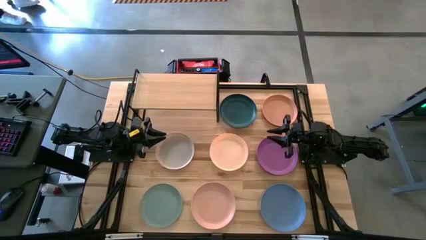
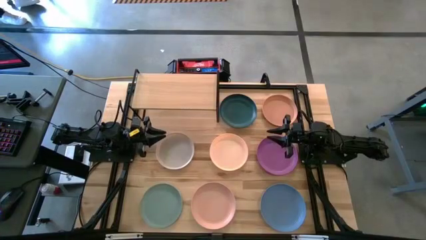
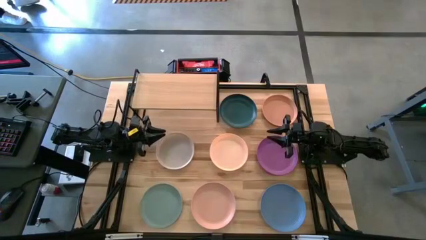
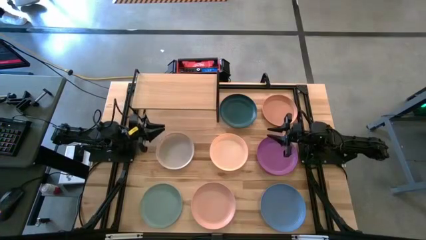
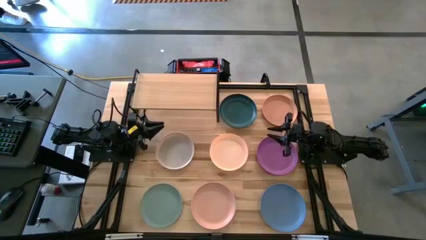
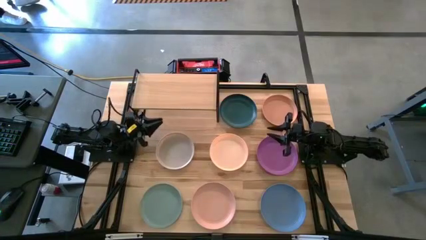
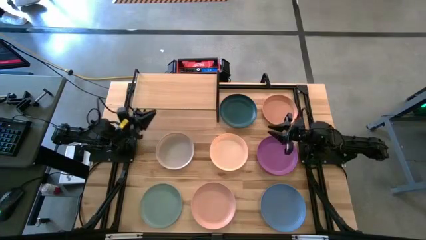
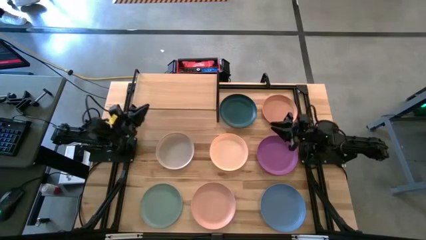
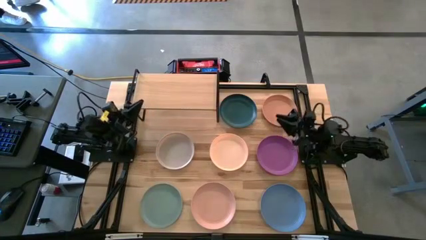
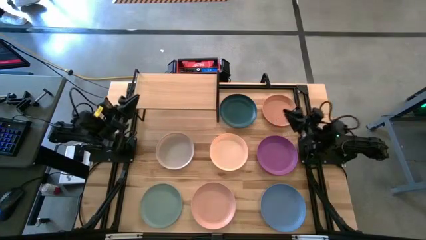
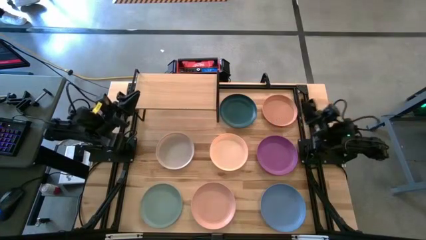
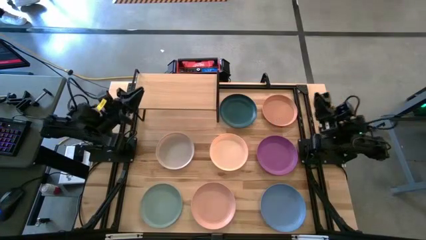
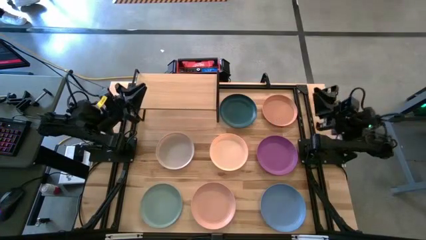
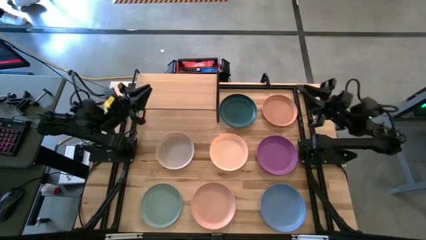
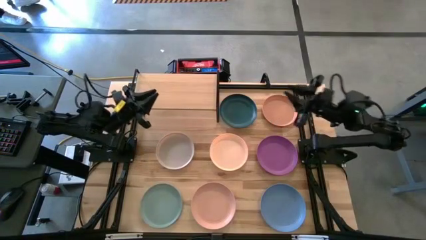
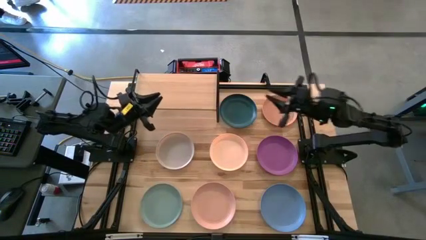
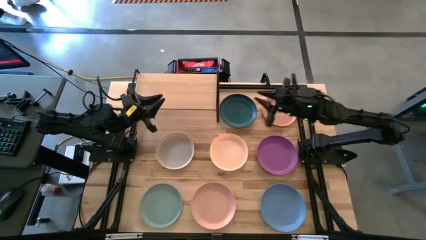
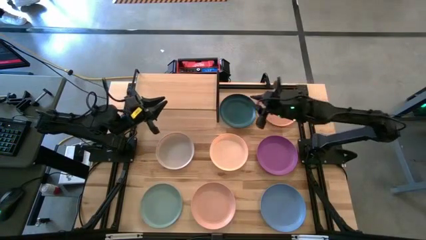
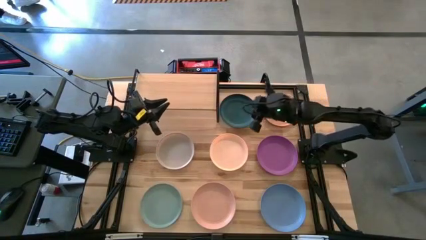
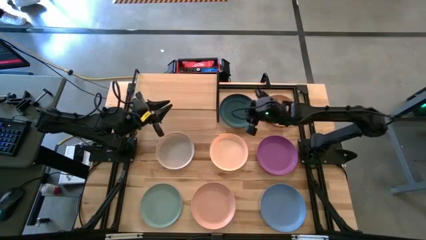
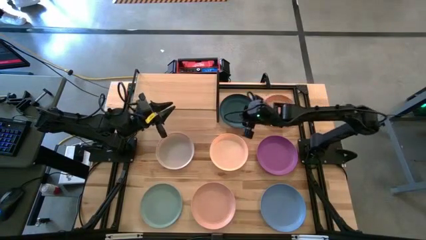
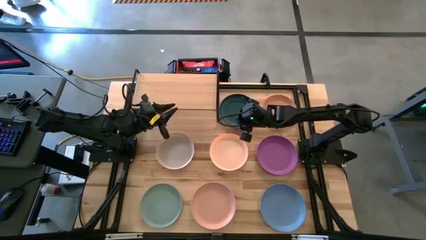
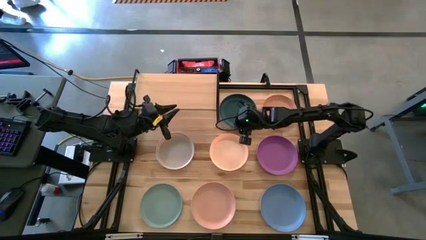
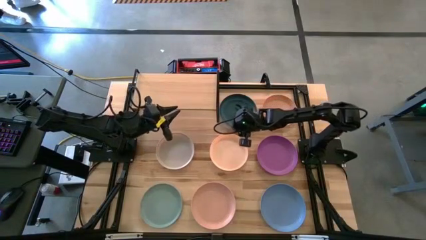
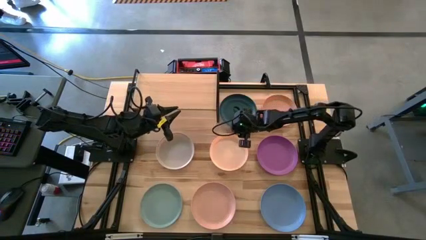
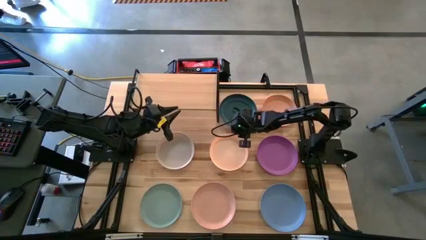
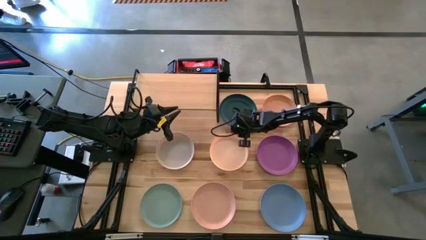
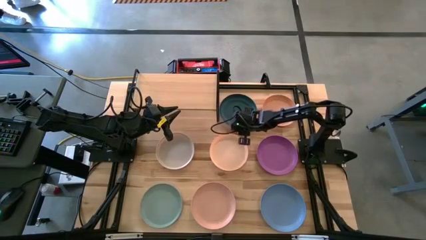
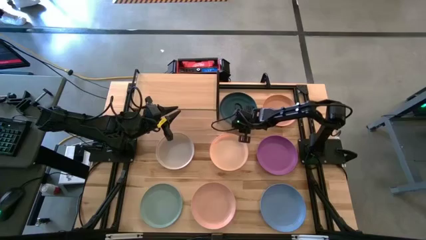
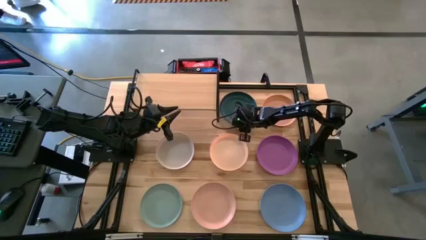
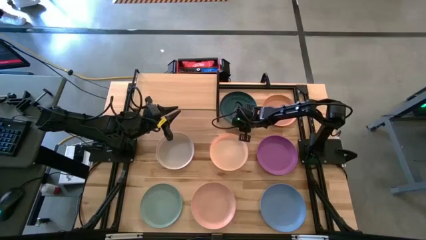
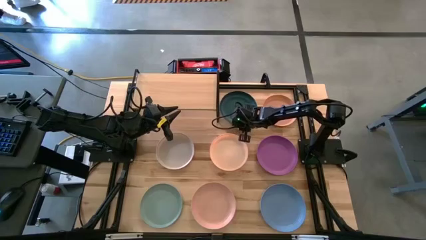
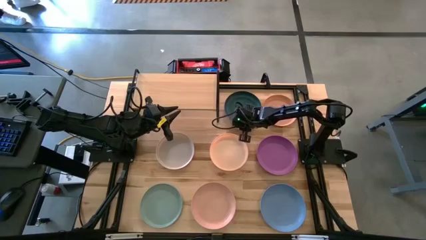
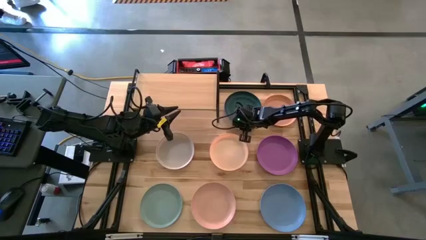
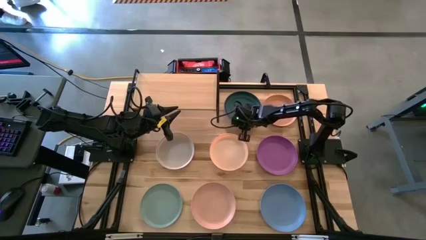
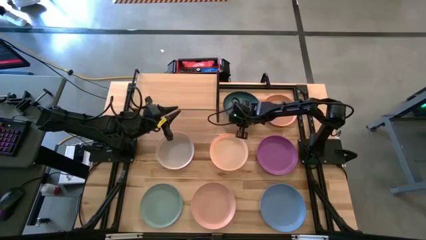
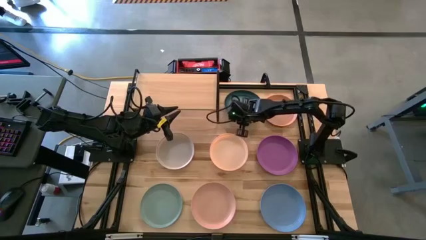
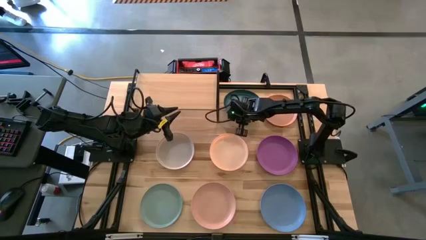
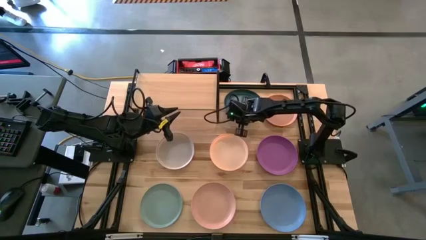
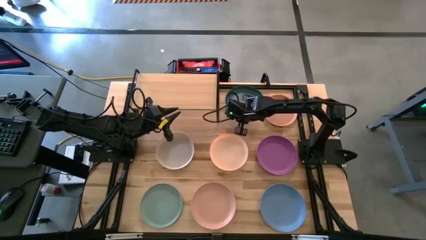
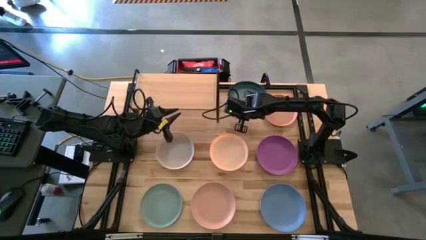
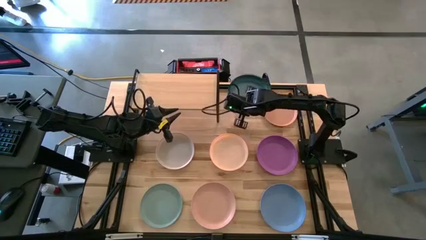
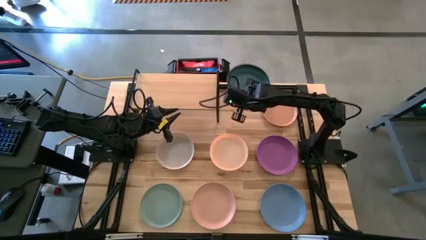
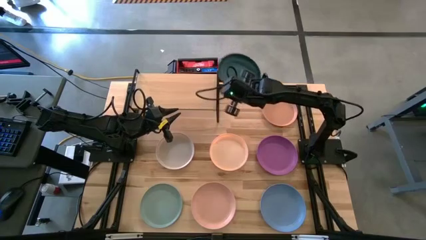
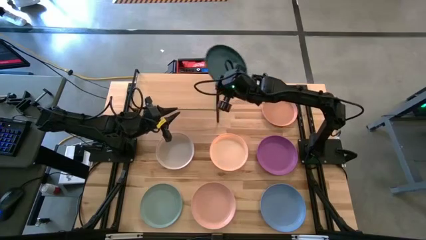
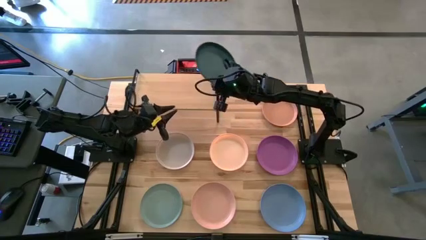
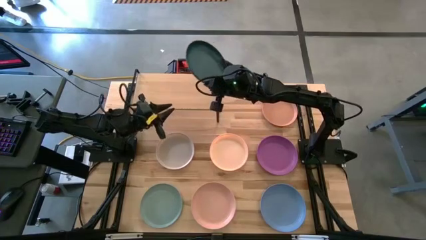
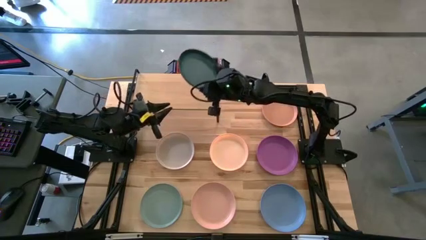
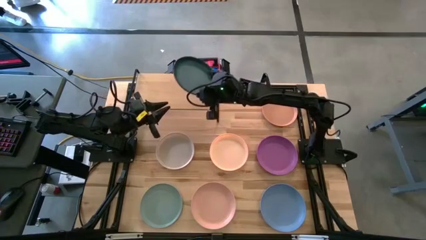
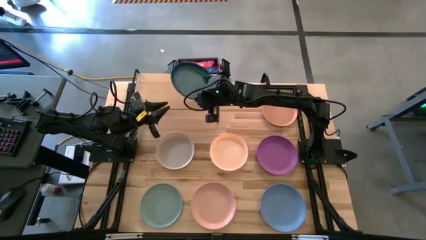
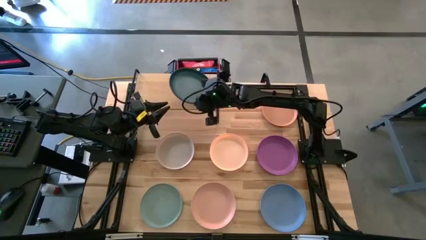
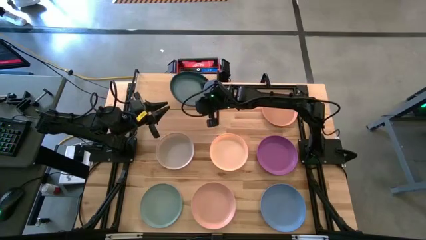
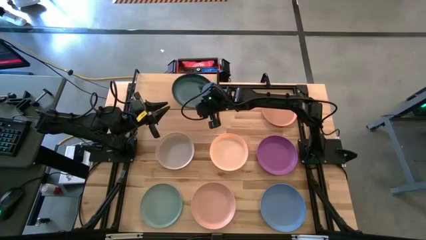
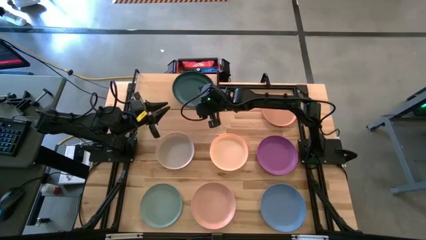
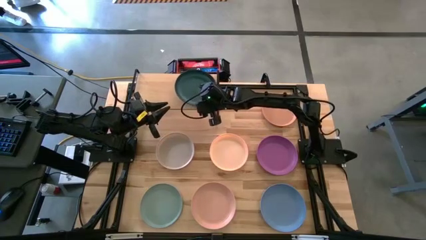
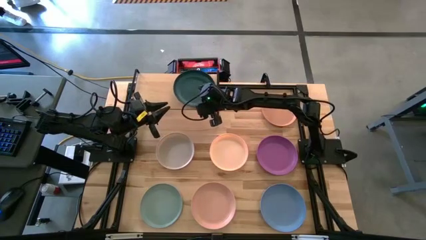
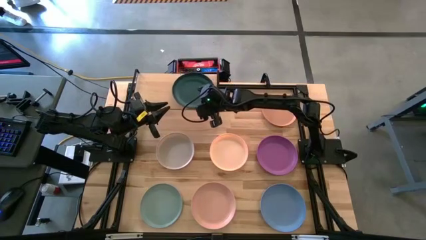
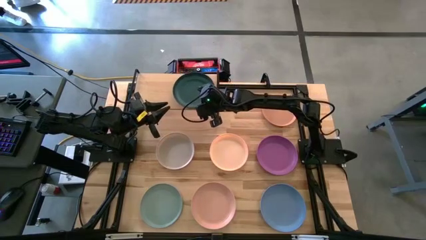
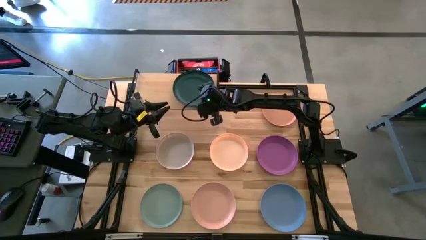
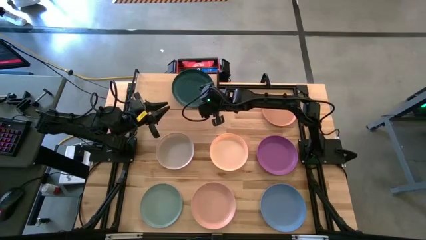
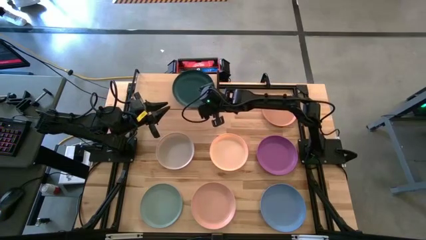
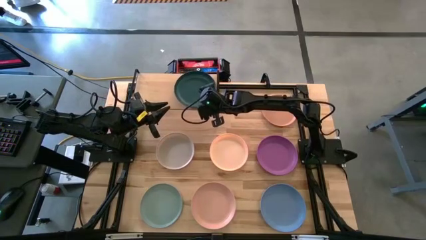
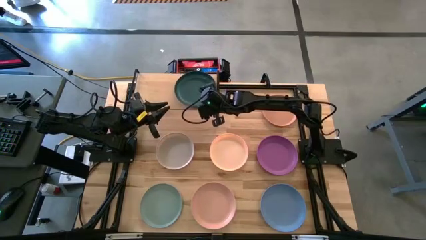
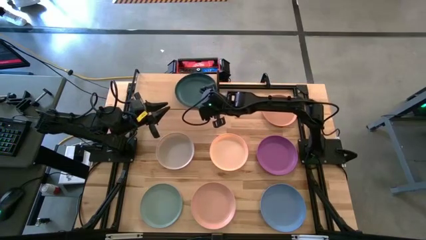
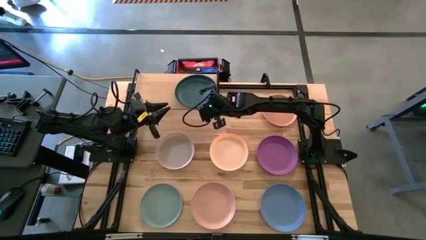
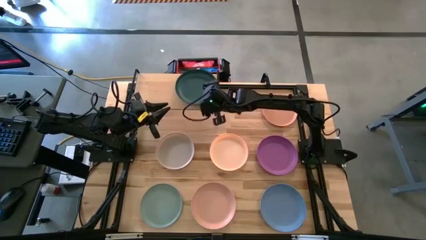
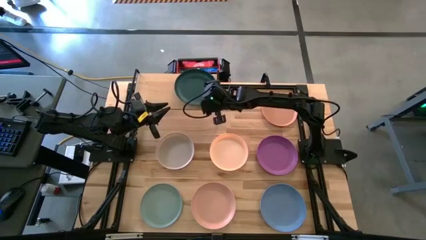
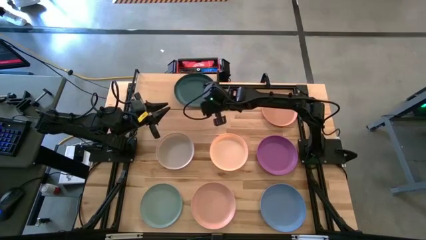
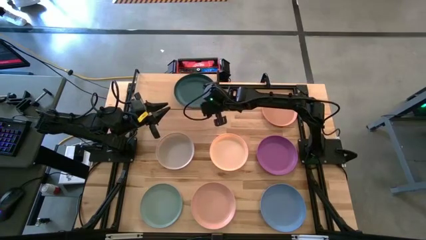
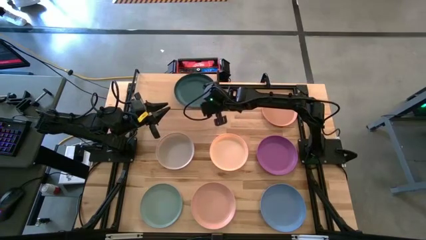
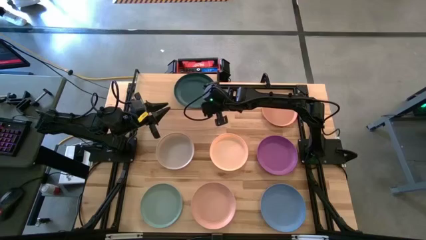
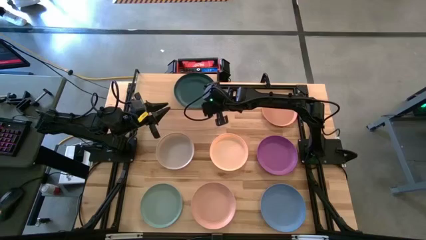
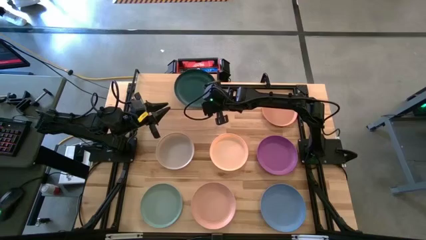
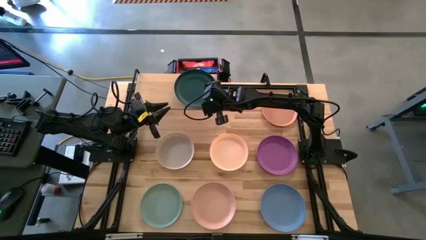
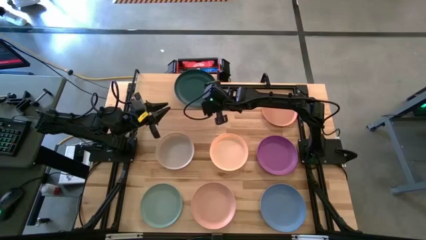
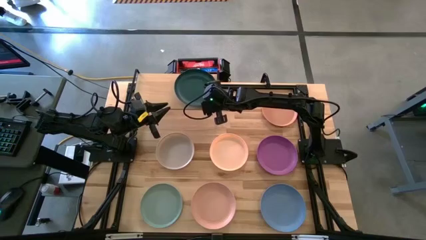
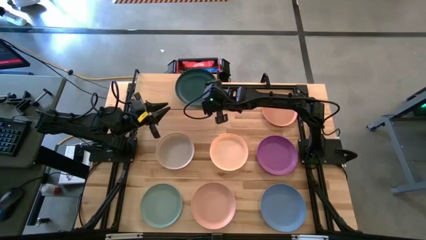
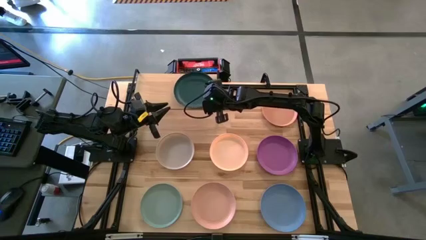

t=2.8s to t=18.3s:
Task: Place and stack plates onto a shelf
Put the dark green plate on the right part of the shelf
